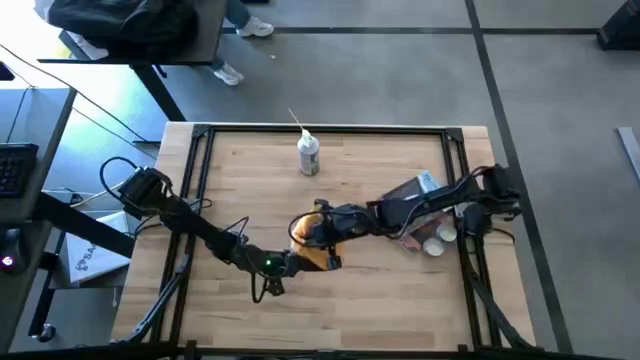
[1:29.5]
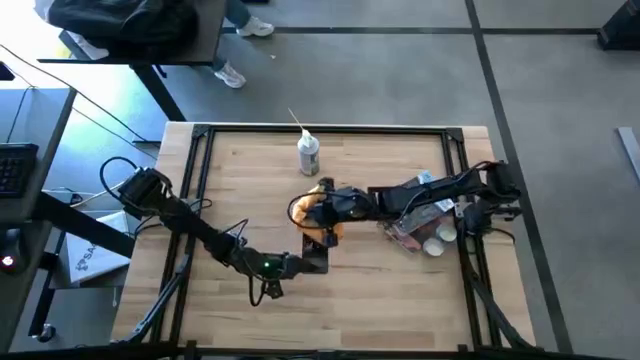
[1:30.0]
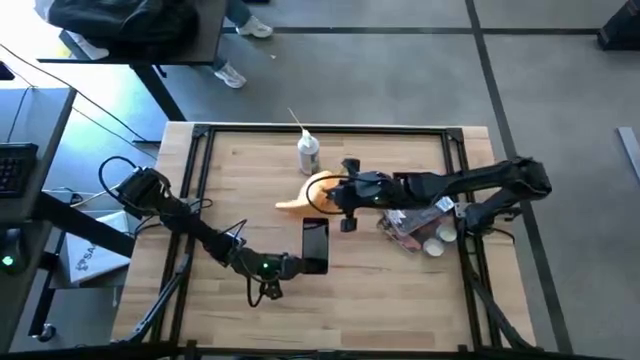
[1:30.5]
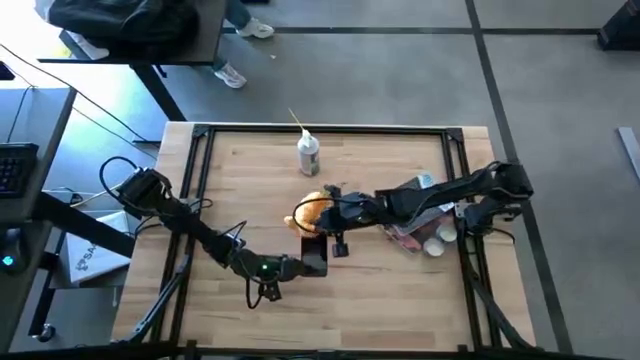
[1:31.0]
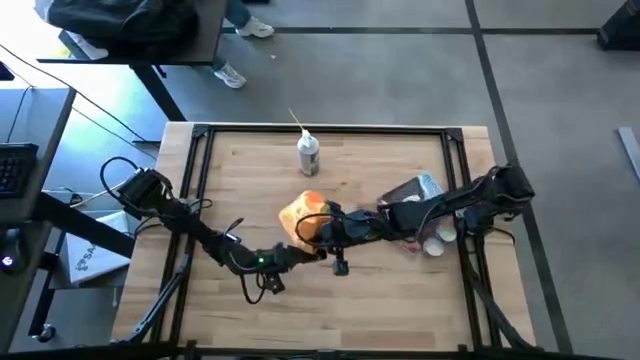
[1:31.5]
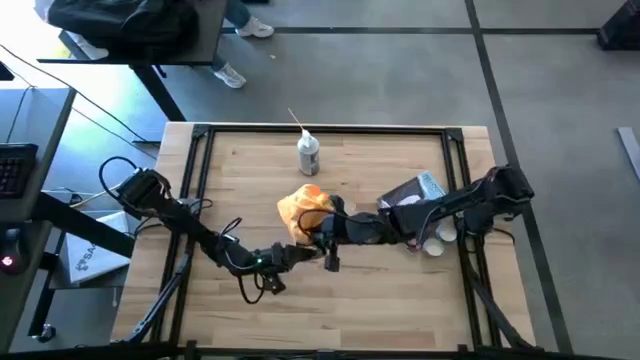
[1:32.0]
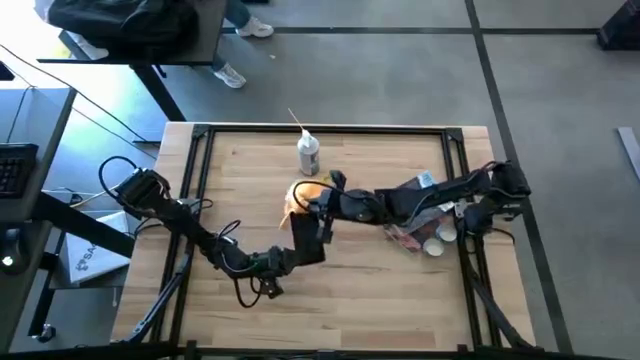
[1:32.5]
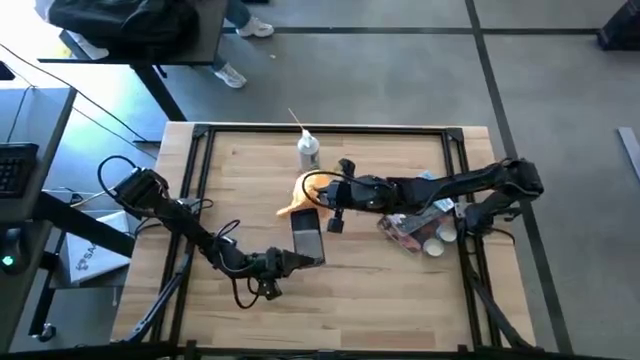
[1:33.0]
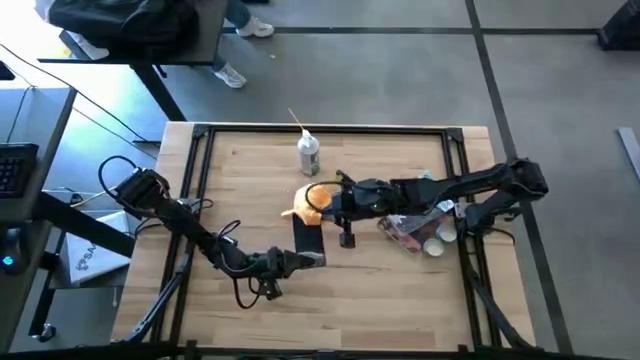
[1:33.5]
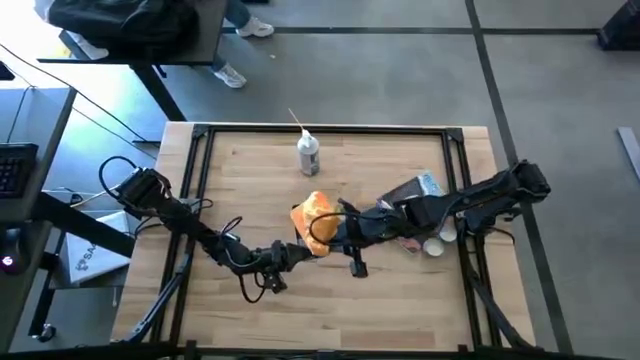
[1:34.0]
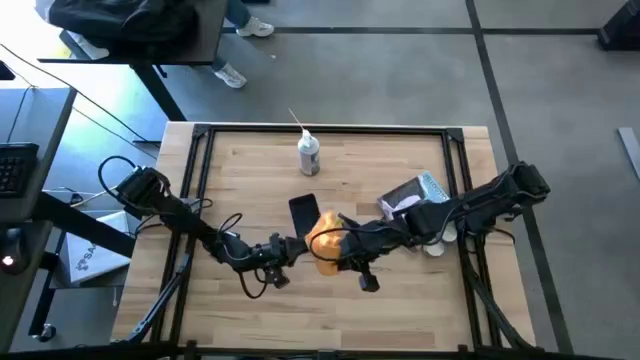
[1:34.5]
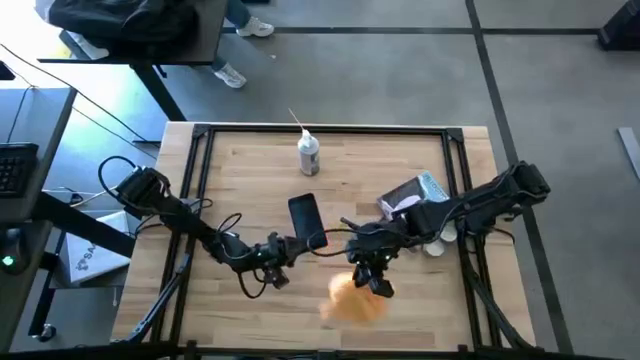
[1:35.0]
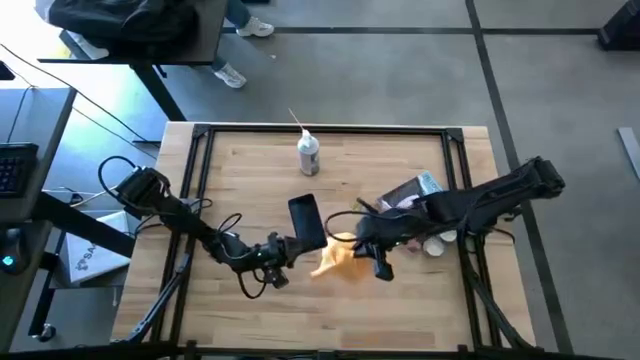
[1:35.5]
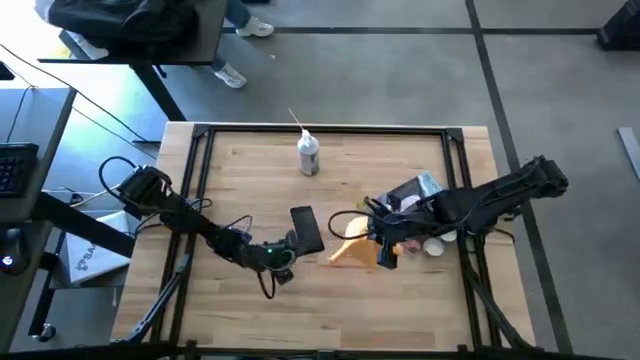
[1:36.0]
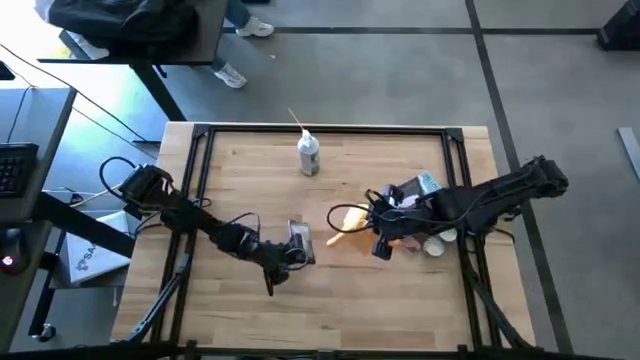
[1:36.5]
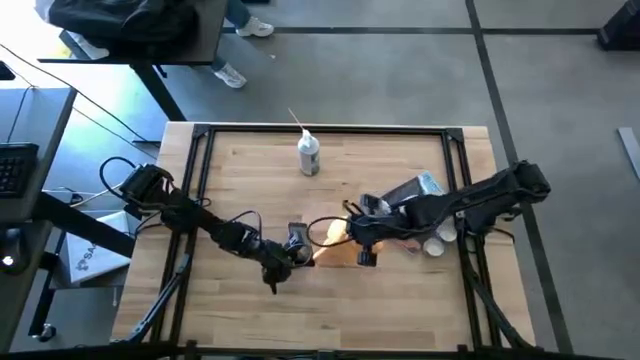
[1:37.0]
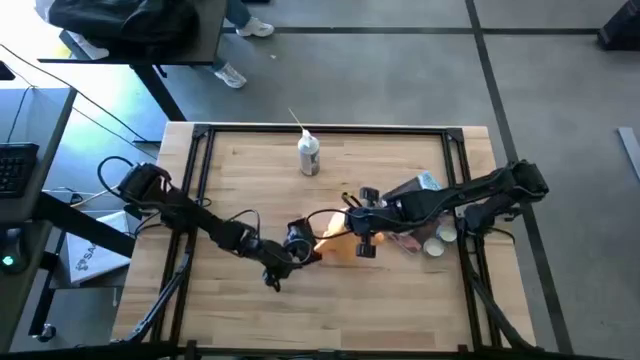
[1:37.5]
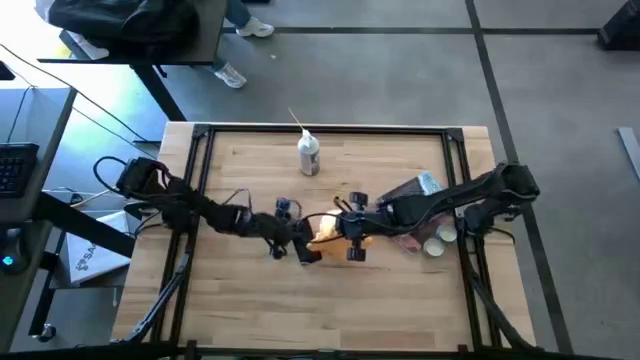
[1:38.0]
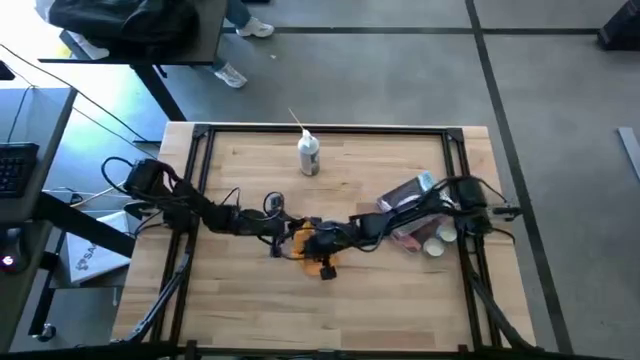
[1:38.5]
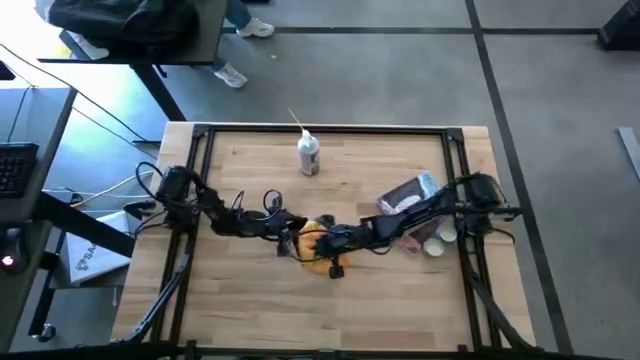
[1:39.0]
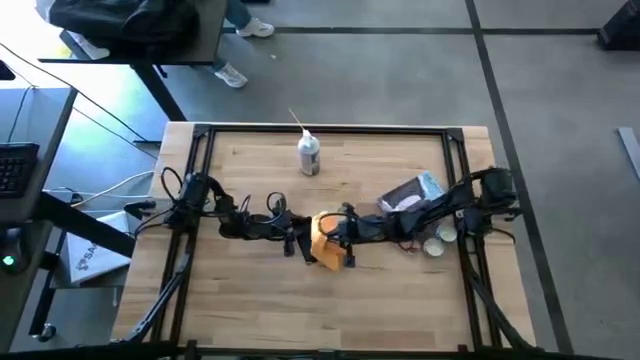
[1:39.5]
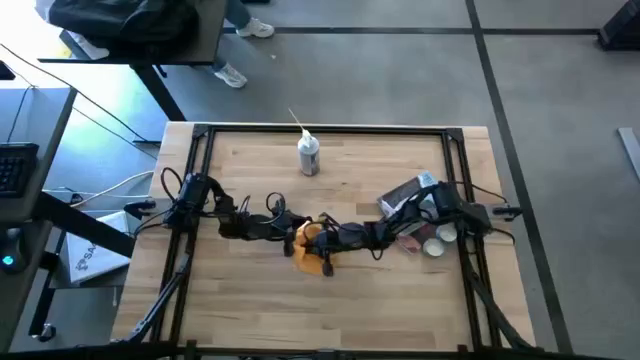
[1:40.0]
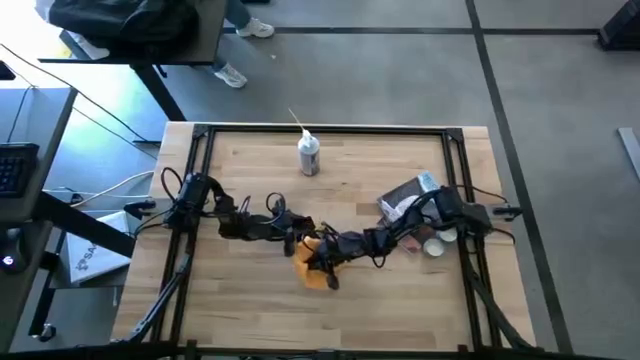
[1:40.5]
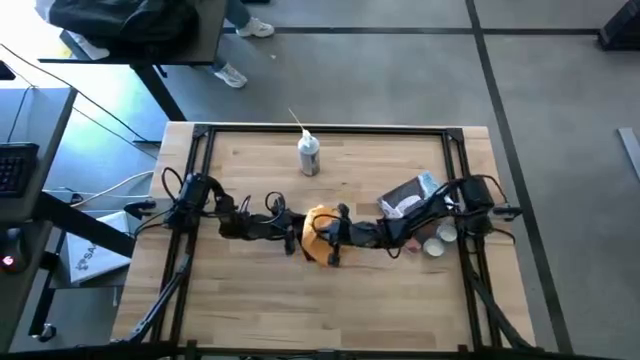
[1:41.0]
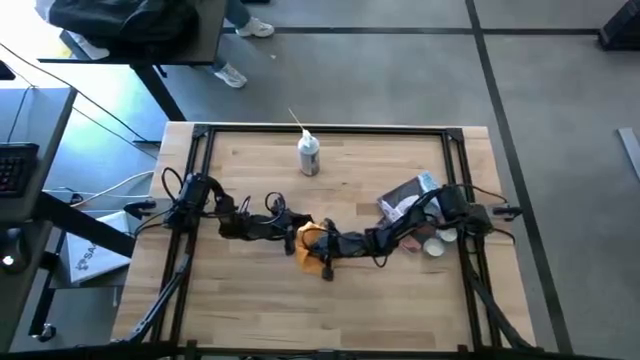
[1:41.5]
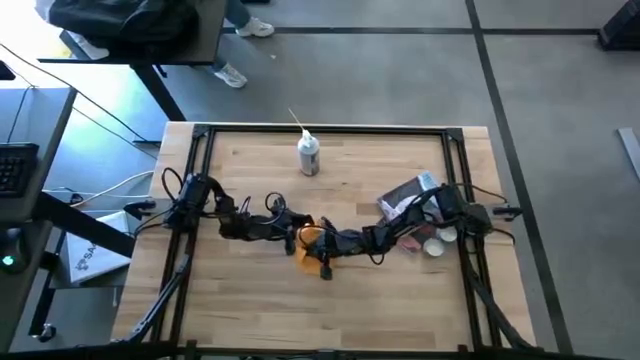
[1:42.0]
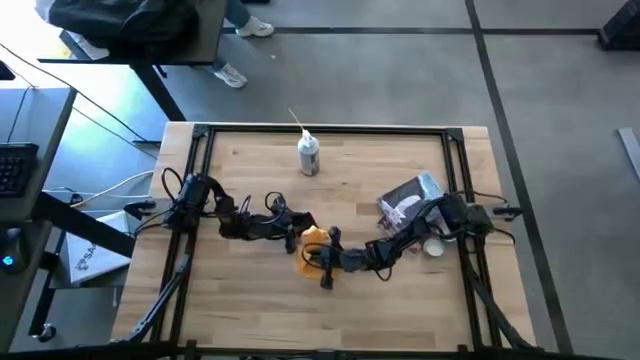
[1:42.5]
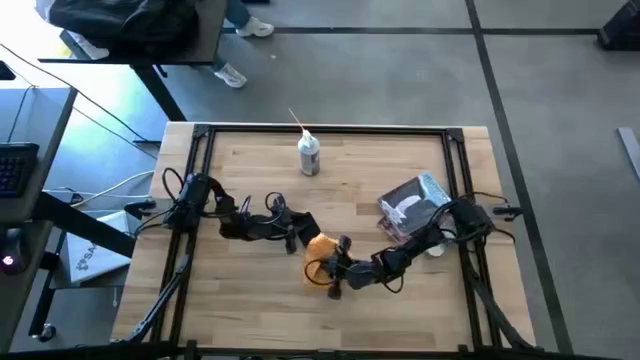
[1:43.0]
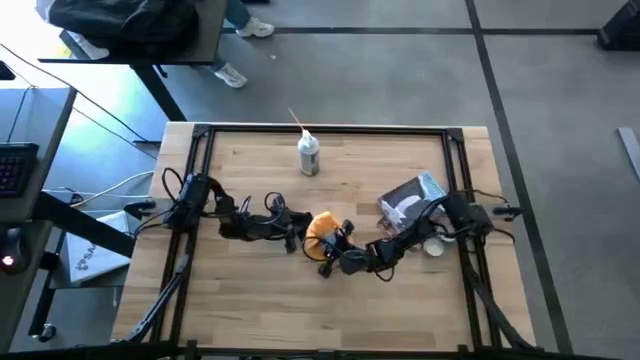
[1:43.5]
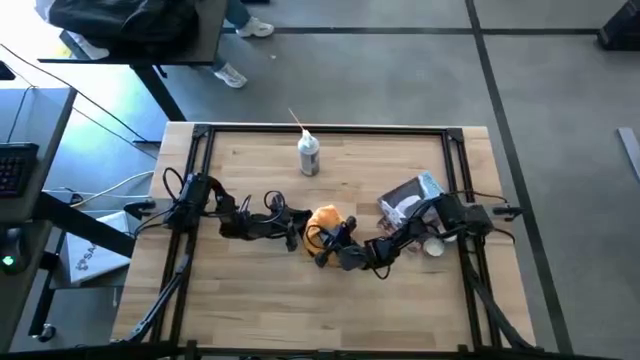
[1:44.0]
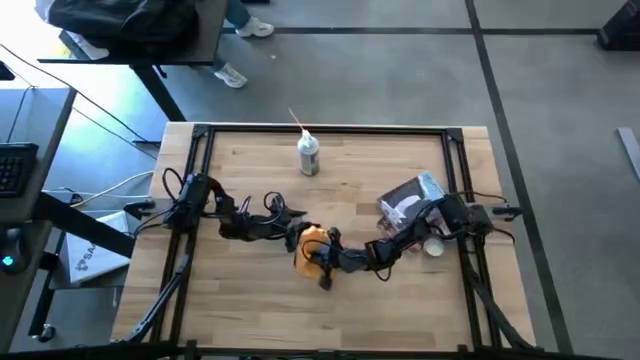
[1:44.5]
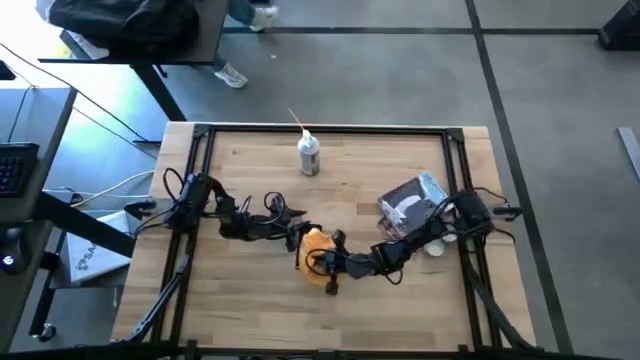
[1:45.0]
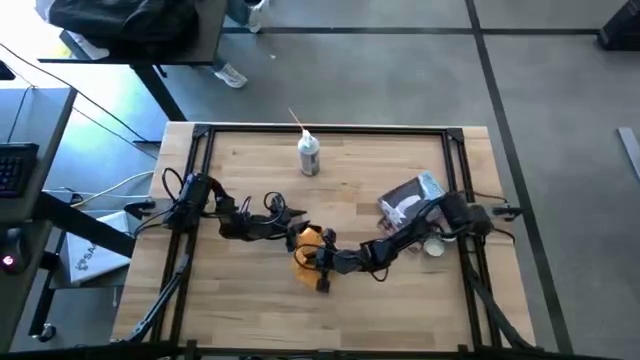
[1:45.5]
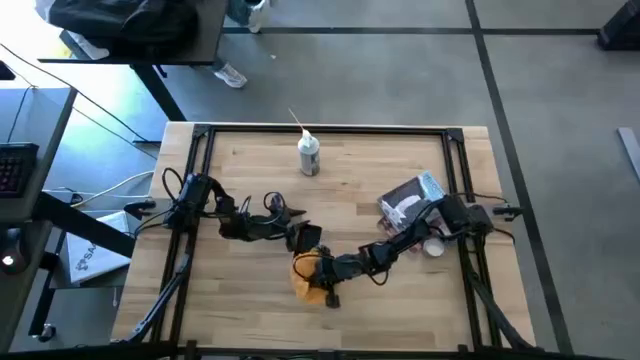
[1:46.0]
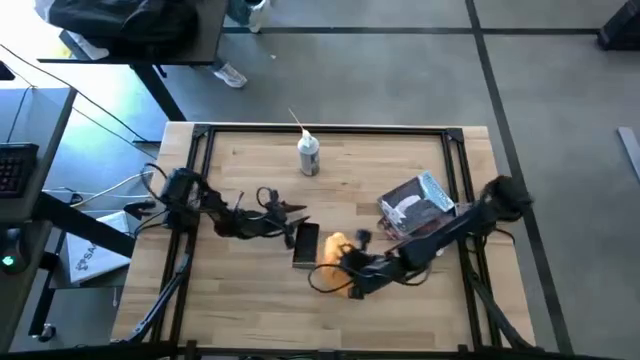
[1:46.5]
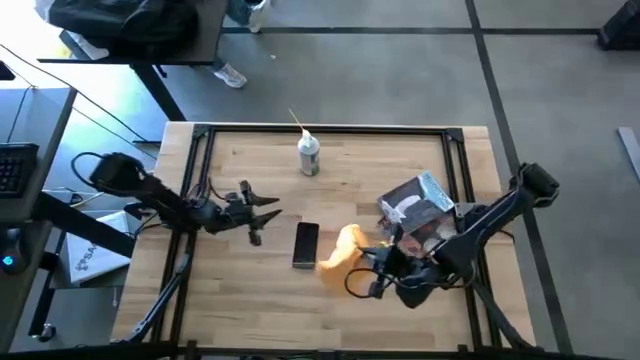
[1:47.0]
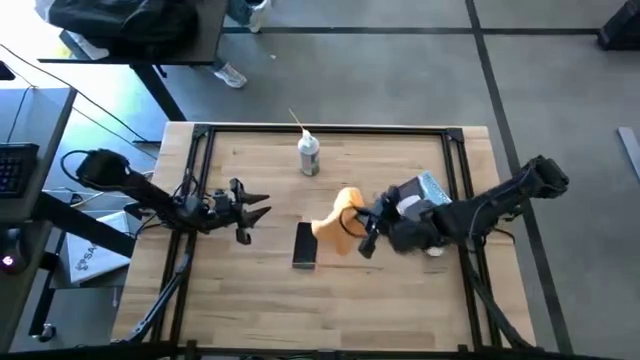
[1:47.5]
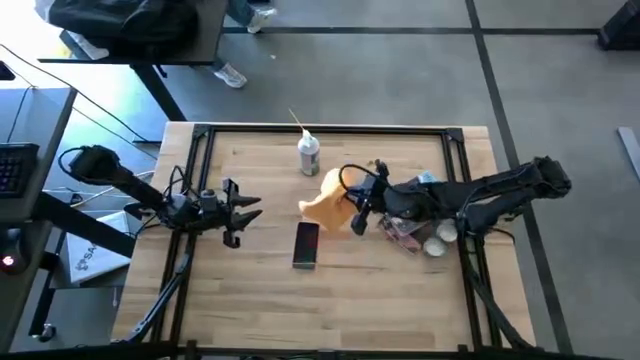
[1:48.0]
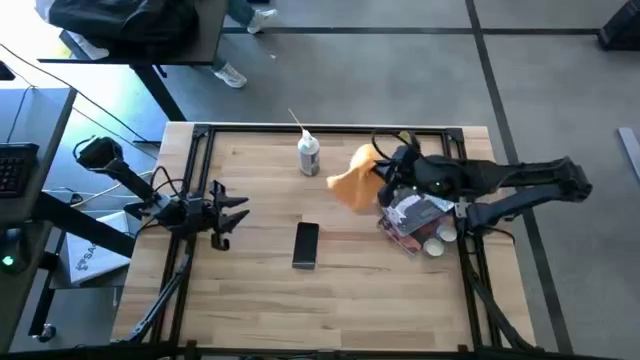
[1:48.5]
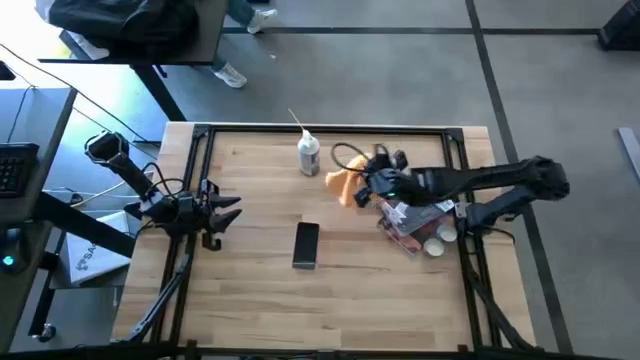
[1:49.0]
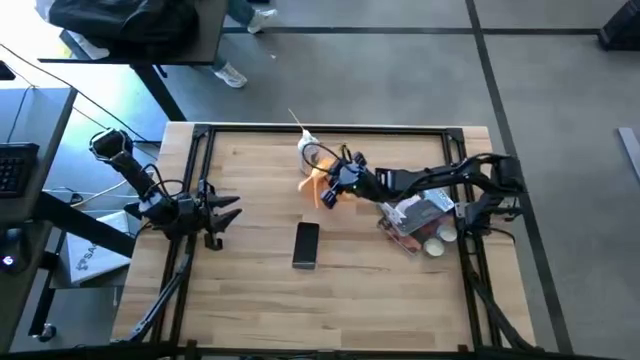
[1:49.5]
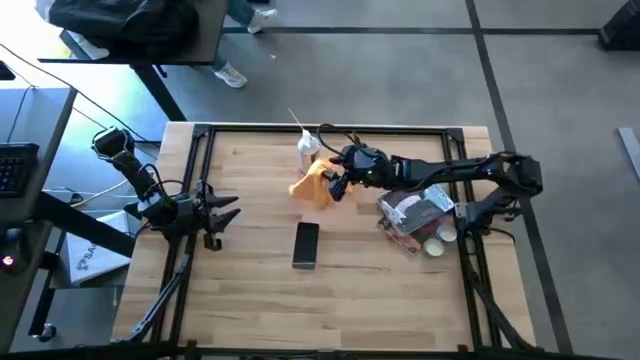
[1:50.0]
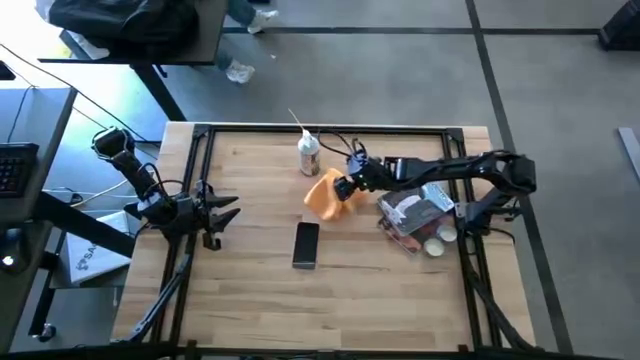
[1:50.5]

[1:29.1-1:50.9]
Task: Apply microfiber cloth
Wipe the back and front of the cellphone using the orange microfiber cloth
